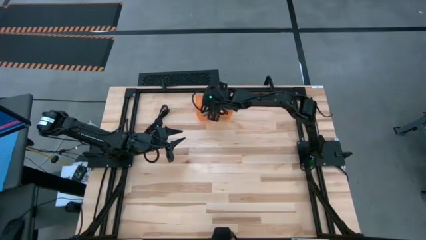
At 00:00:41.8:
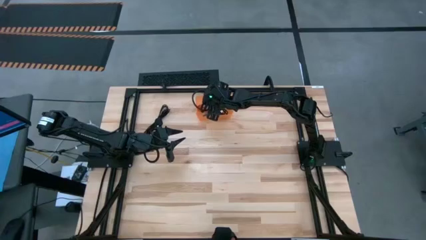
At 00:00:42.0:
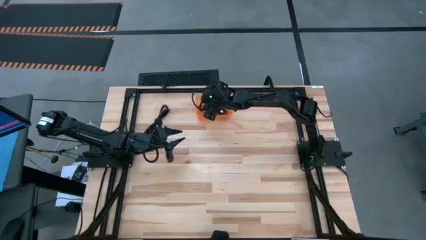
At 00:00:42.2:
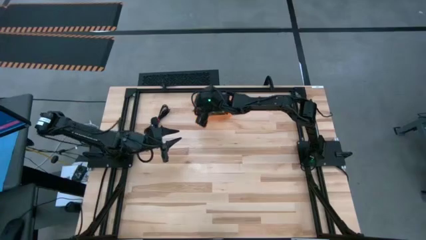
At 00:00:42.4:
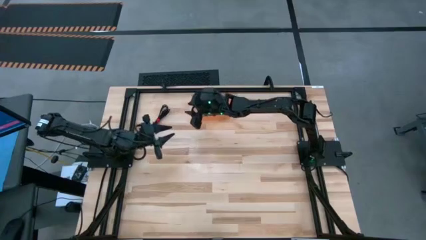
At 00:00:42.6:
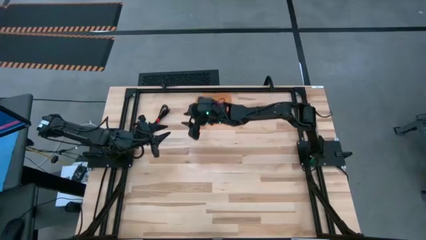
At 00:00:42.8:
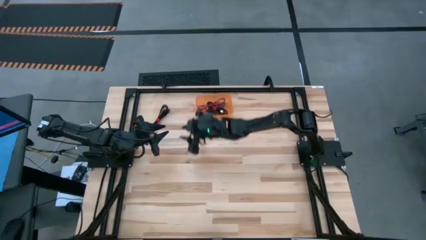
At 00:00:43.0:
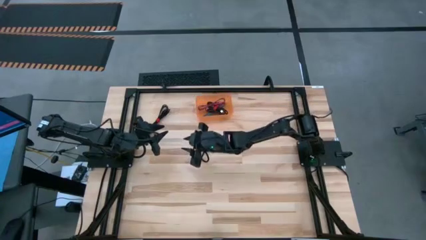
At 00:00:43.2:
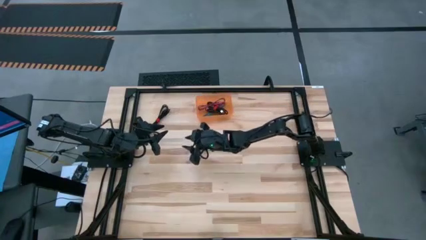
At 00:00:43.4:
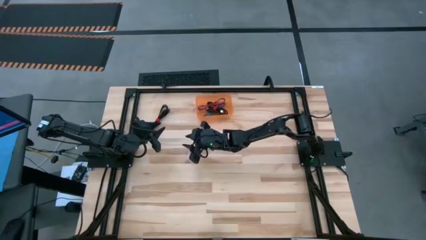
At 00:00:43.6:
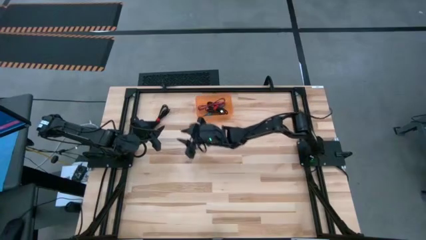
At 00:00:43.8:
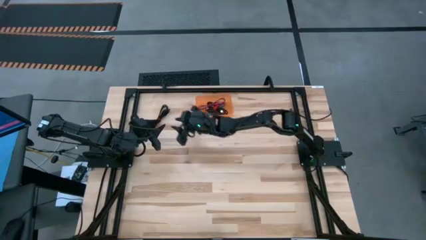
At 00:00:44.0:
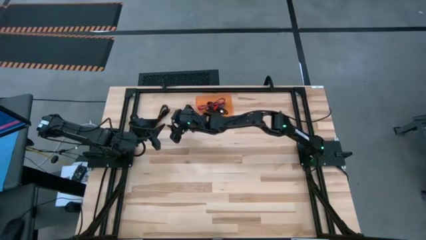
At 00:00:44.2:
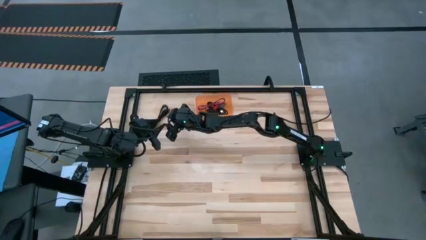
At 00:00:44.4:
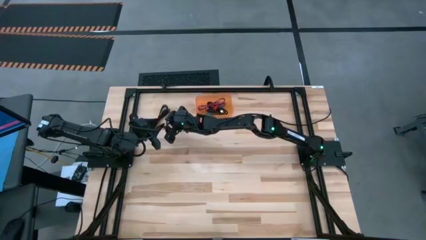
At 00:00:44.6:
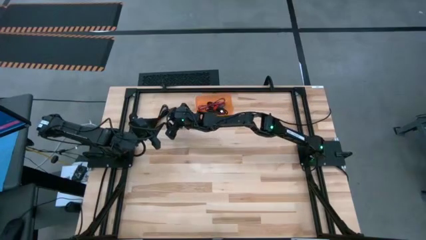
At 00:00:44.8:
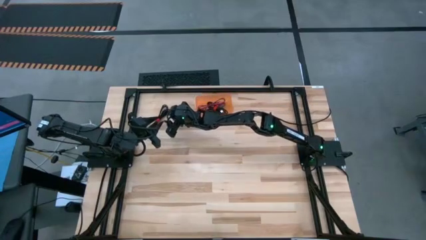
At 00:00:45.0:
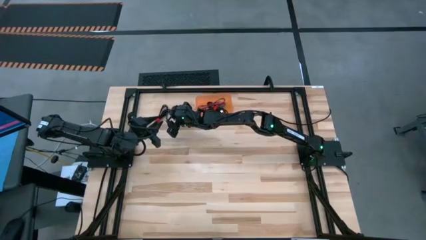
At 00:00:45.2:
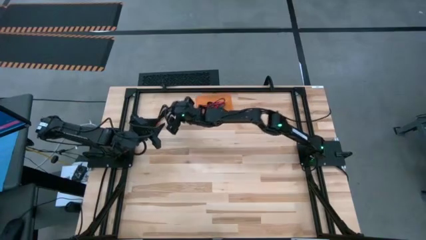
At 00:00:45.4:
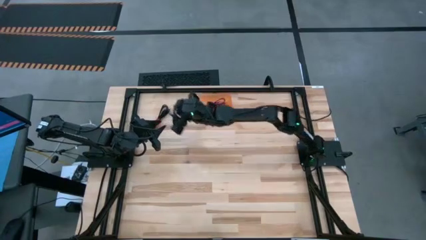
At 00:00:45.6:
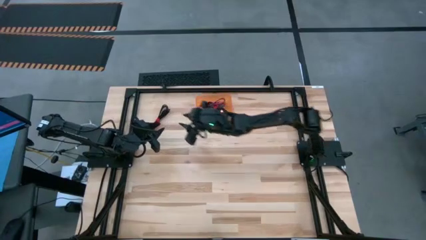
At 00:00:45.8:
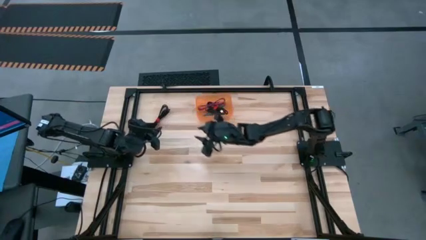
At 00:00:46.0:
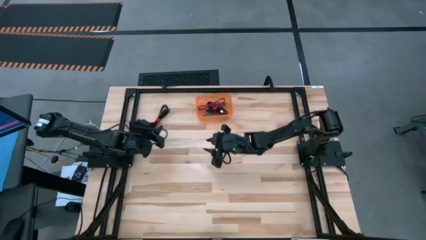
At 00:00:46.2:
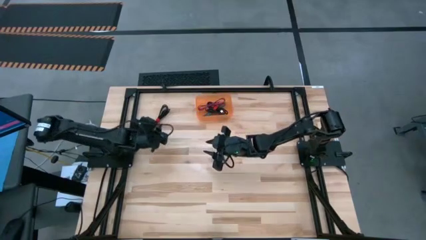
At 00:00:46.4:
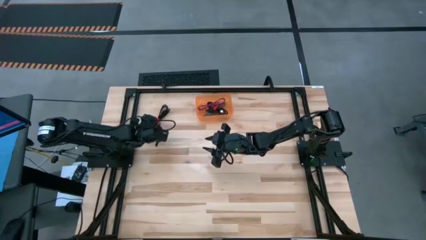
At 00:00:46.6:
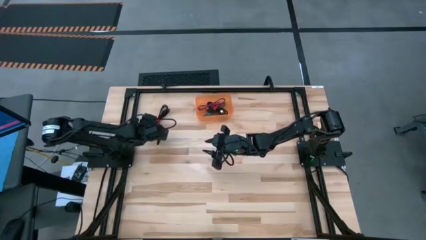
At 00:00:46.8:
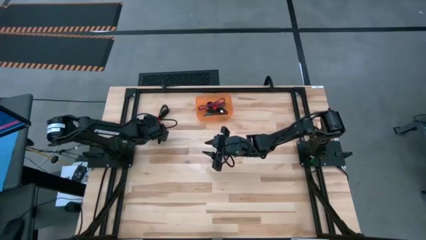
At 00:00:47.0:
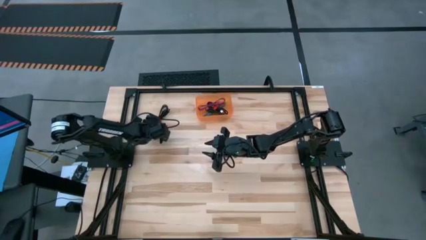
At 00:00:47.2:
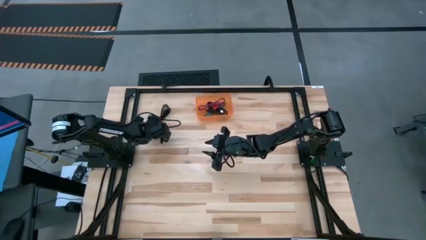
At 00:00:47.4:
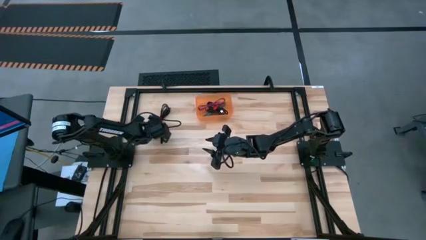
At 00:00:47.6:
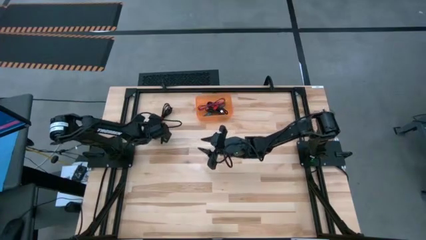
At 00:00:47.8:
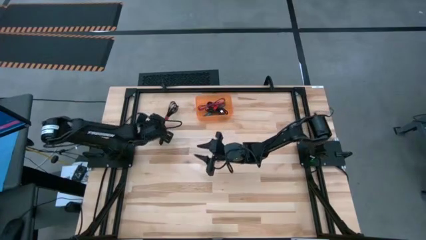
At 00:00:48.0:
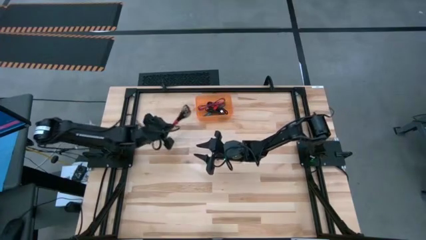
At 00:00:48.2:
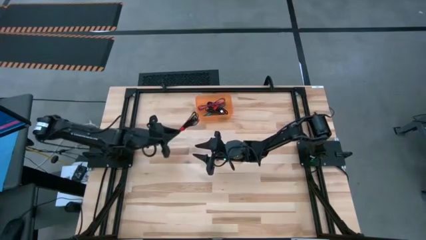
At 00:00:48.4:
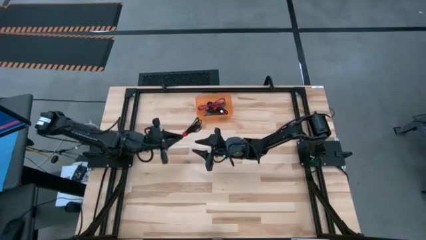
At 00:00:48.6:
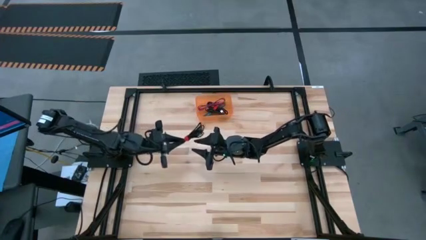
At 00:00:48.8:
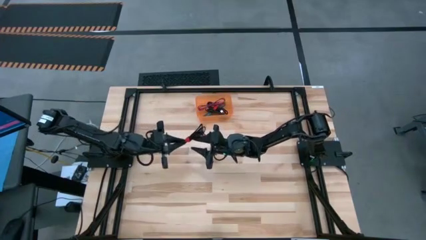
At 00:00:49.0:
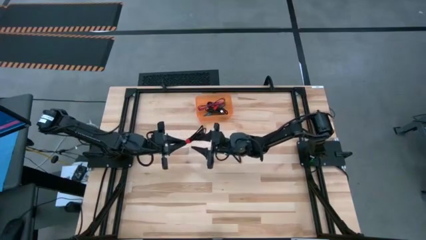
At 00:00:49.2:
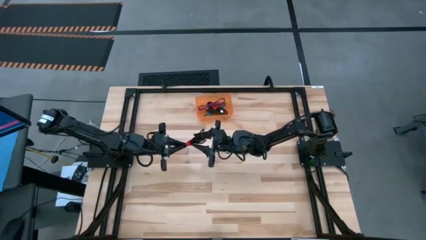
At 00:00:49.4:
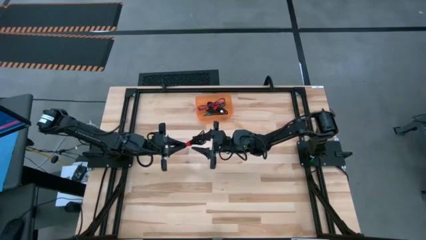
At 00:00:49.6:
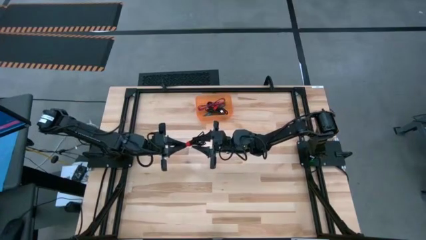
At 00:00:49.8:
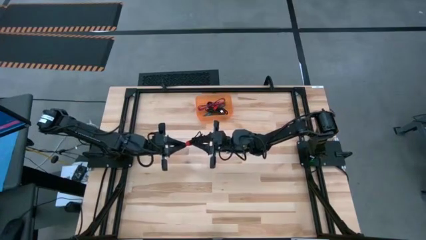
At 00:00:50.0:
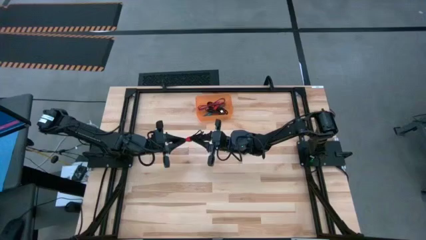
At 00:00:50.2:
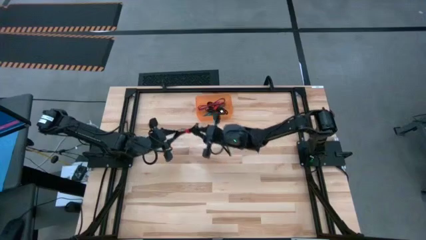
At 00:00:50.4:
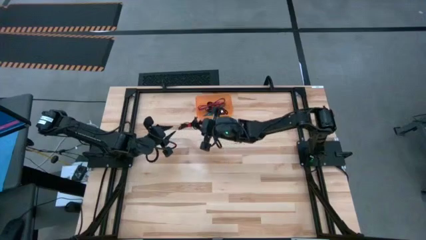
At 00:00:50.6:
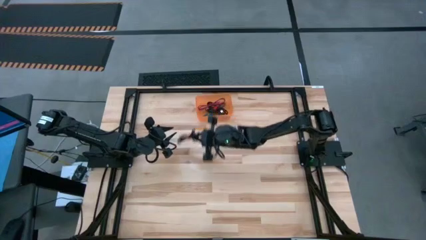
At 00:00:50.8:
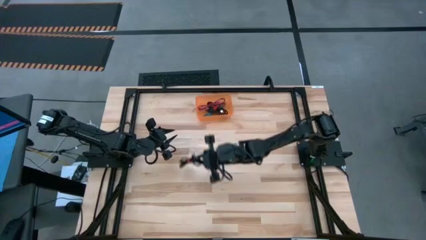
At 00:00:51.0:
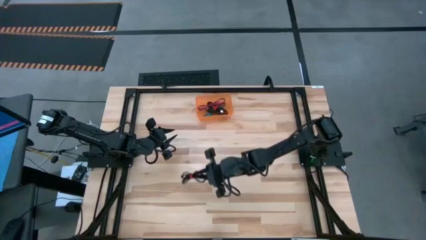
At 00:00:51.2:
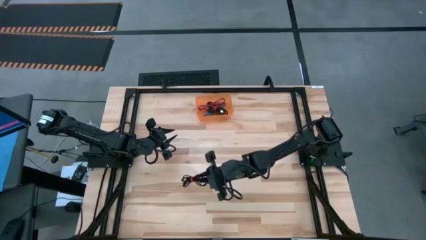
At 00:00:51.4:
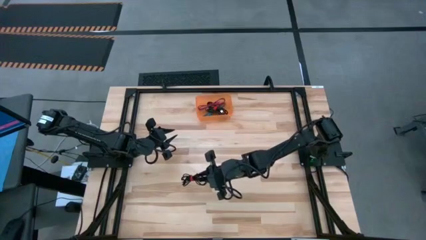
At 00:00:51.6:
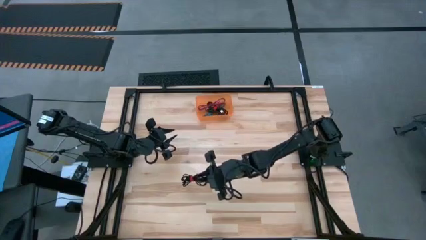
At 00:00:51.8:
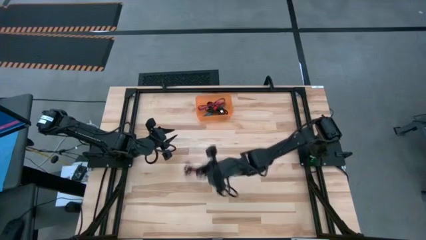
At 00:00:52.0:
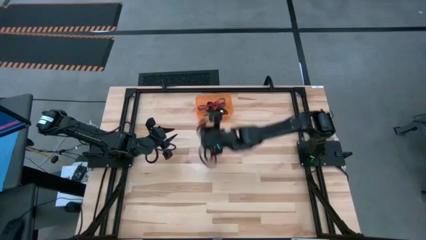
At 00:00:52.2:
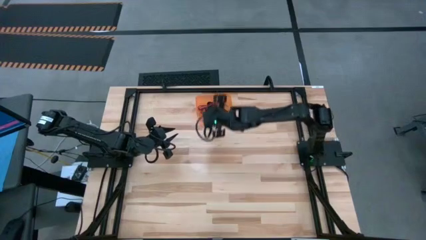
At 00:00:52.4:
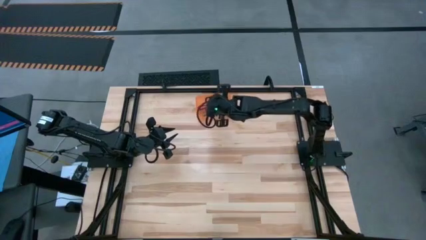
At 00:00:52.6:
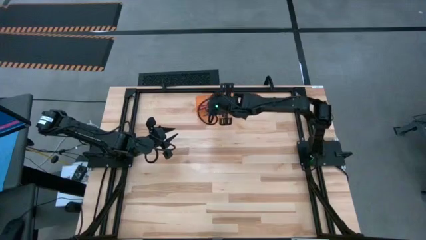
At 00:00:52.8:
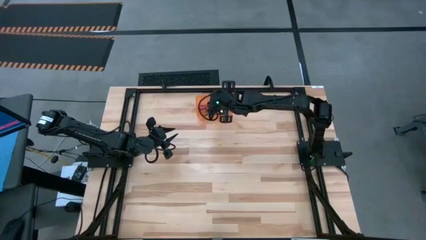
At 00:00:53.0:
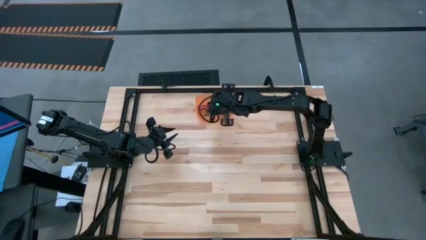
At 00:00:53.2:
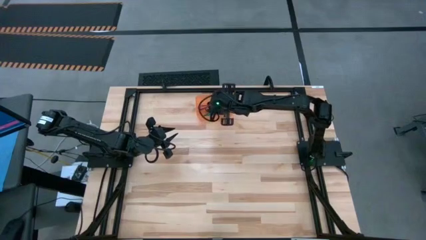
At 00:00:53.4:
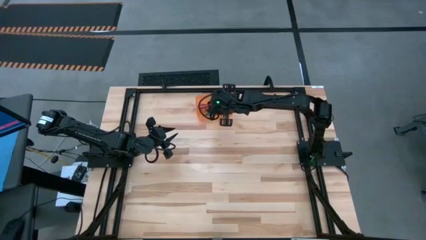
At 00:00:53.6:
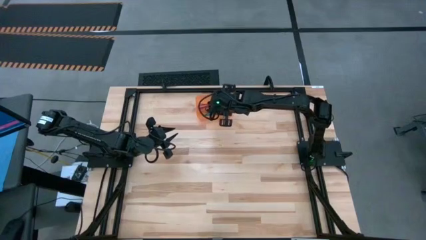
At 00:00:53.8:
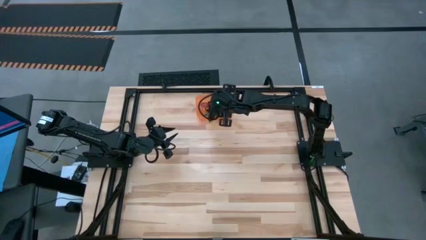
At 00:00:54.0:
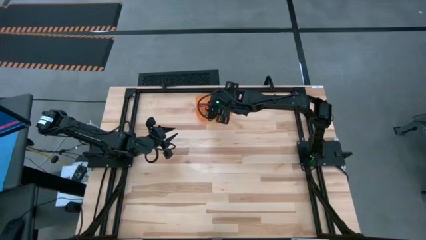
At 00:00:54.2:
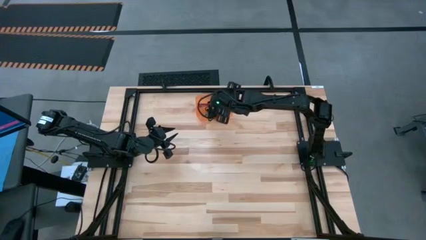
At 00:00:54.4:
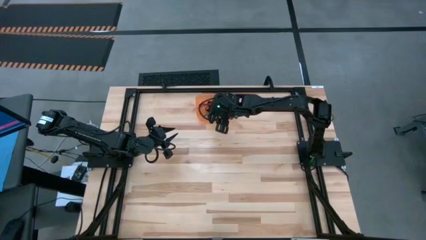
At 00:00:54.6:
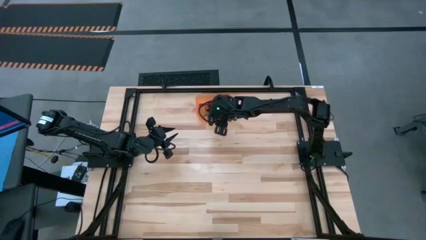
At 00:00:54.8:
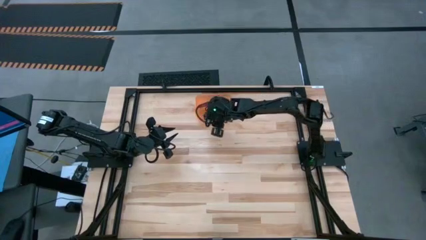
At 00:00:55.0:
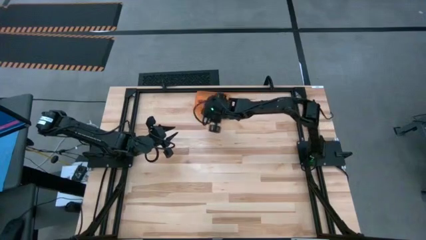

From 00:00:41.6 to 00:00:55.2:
Task: Pick and place USB-C Cables
Put the black charger cable into the orange bin
